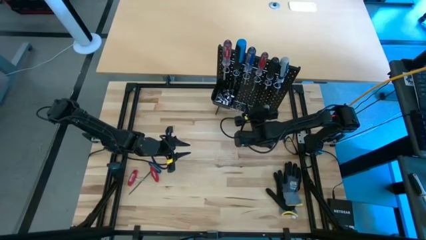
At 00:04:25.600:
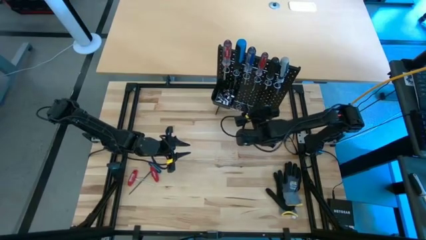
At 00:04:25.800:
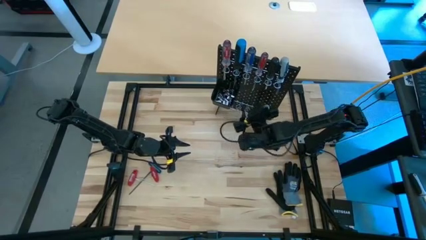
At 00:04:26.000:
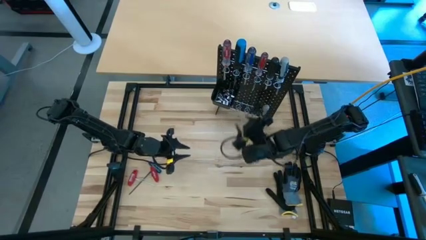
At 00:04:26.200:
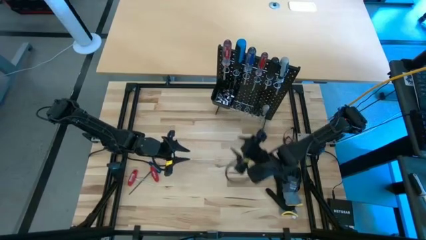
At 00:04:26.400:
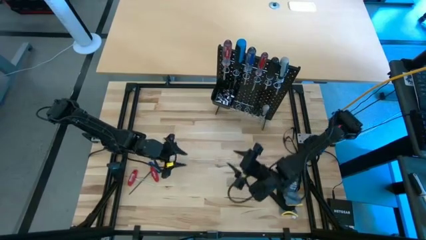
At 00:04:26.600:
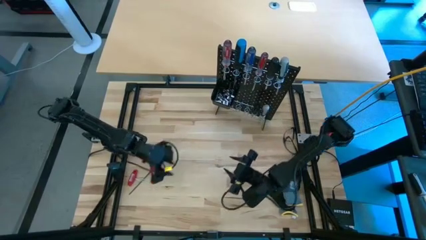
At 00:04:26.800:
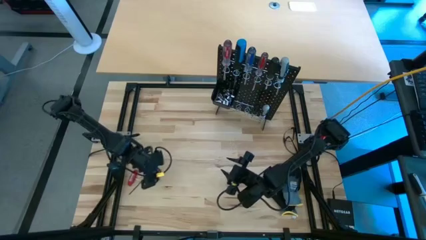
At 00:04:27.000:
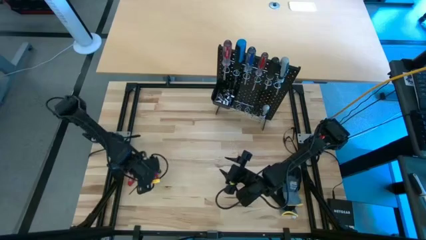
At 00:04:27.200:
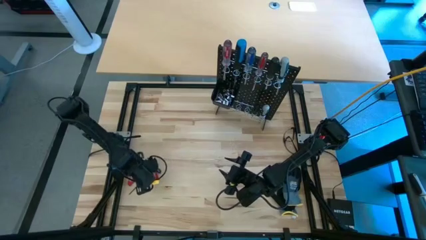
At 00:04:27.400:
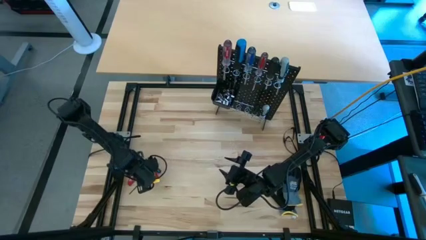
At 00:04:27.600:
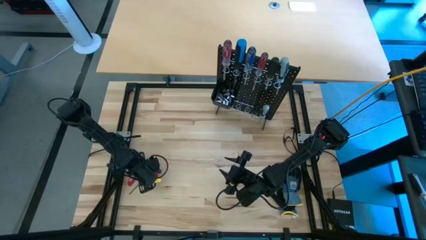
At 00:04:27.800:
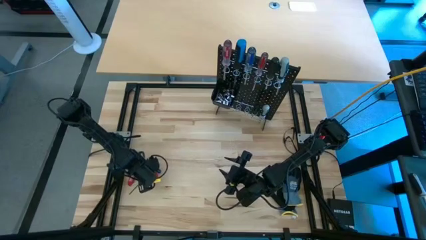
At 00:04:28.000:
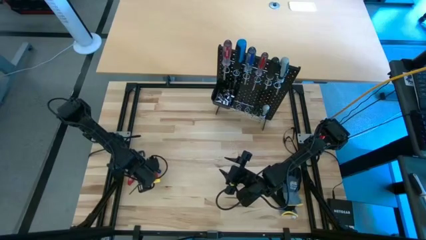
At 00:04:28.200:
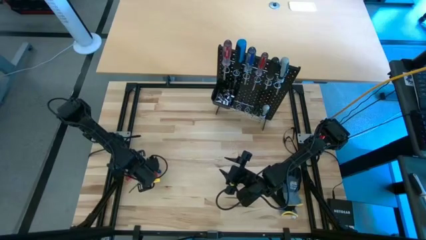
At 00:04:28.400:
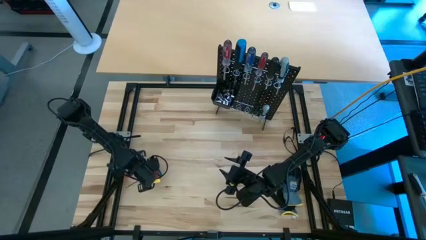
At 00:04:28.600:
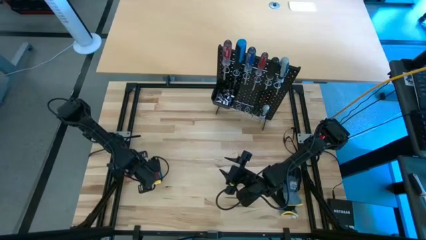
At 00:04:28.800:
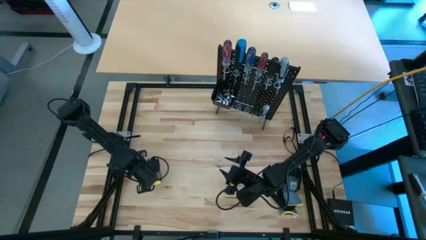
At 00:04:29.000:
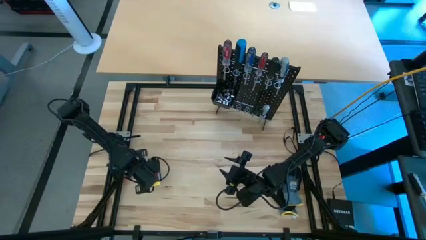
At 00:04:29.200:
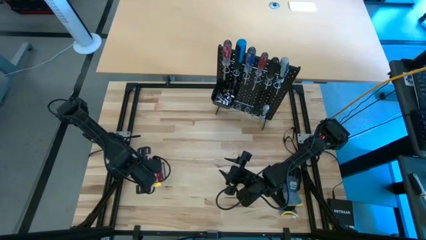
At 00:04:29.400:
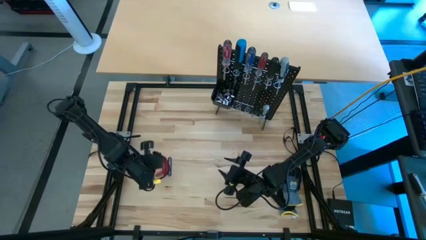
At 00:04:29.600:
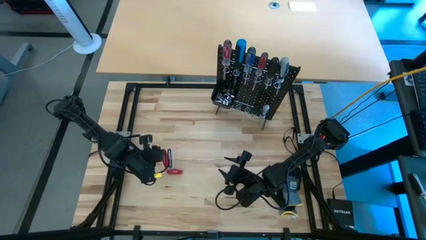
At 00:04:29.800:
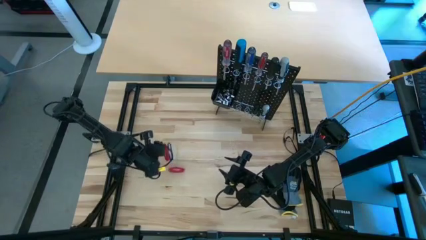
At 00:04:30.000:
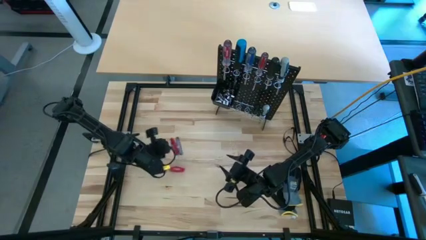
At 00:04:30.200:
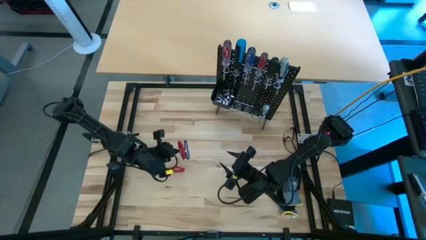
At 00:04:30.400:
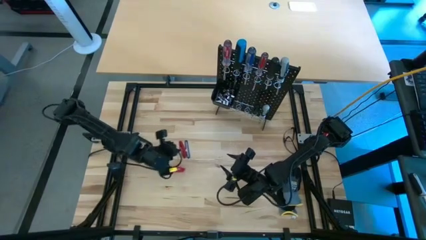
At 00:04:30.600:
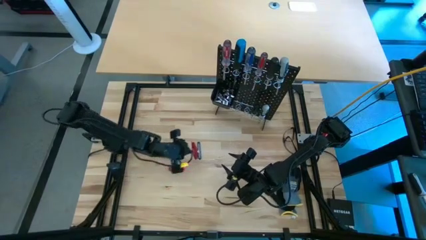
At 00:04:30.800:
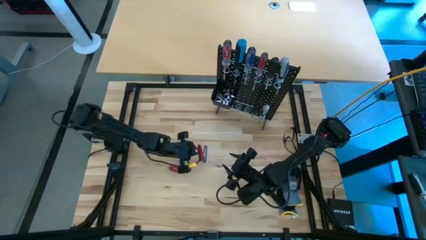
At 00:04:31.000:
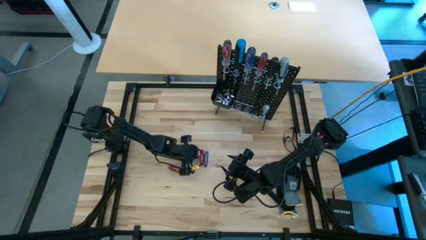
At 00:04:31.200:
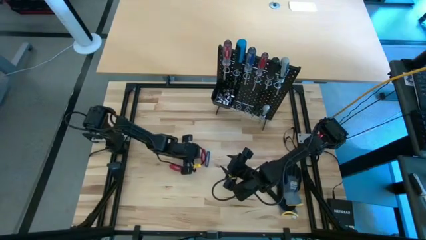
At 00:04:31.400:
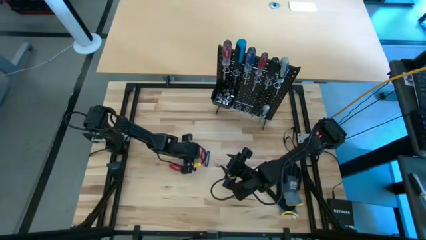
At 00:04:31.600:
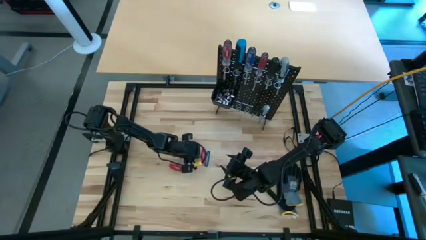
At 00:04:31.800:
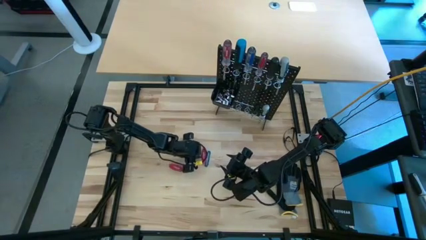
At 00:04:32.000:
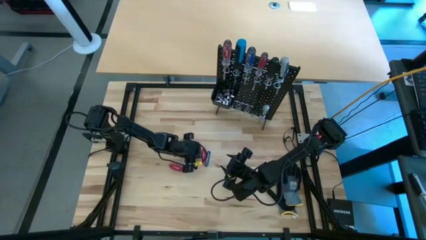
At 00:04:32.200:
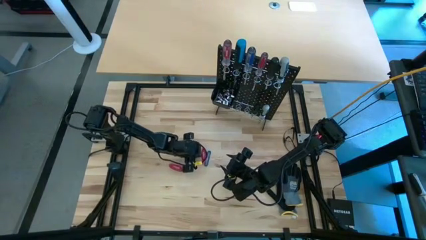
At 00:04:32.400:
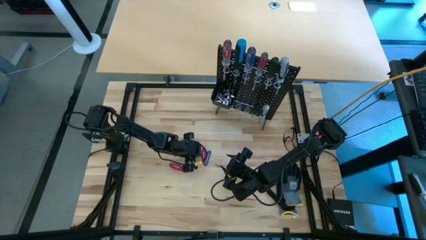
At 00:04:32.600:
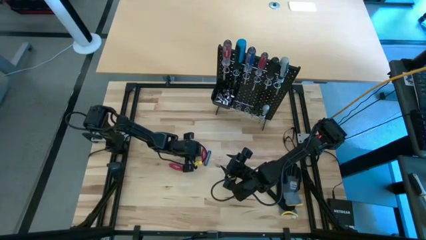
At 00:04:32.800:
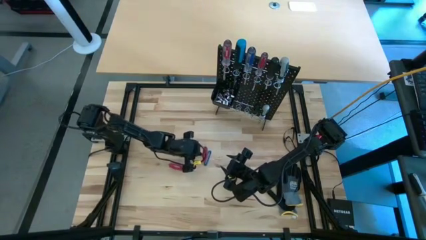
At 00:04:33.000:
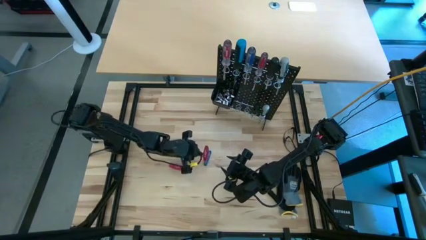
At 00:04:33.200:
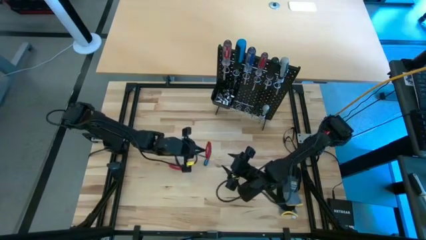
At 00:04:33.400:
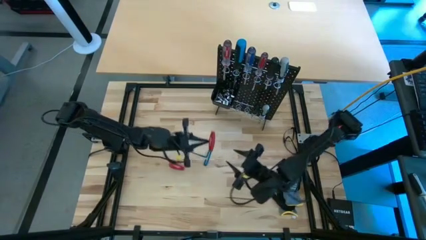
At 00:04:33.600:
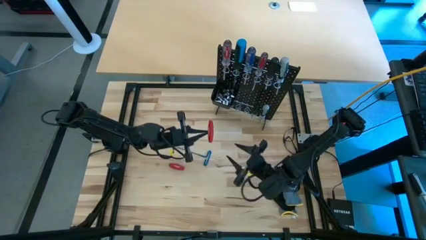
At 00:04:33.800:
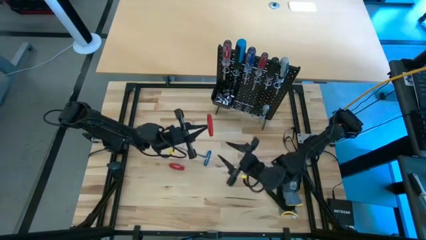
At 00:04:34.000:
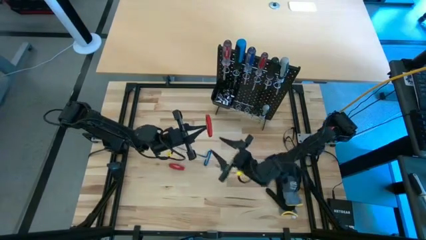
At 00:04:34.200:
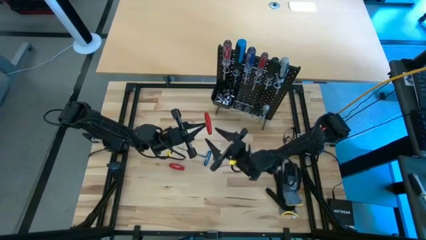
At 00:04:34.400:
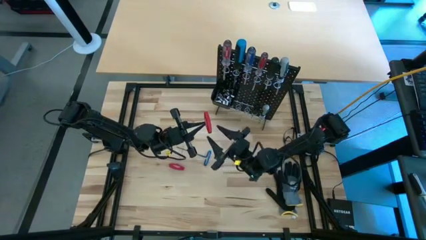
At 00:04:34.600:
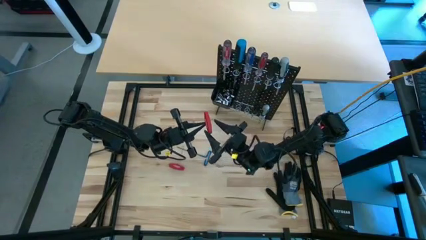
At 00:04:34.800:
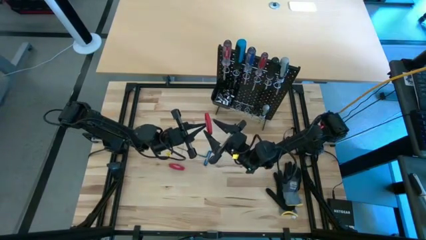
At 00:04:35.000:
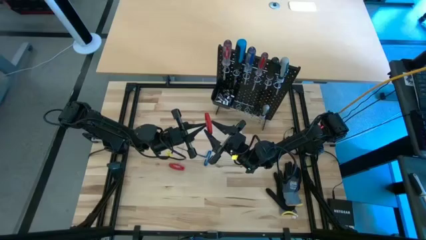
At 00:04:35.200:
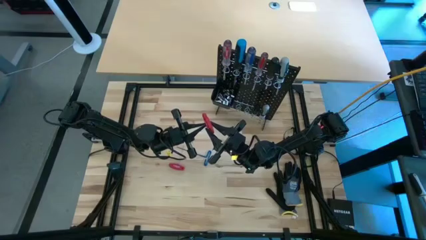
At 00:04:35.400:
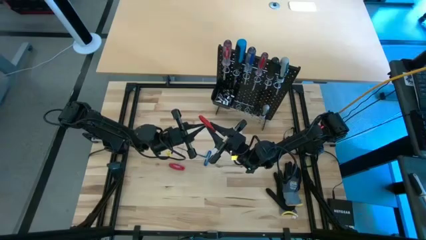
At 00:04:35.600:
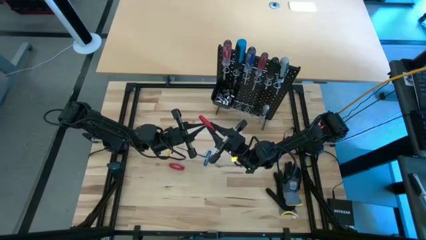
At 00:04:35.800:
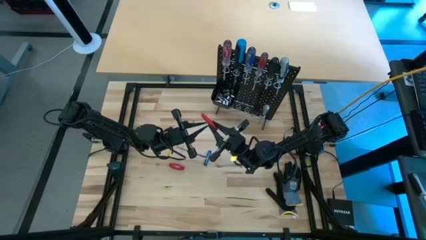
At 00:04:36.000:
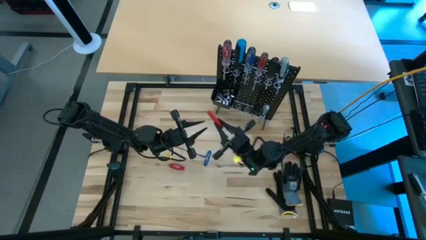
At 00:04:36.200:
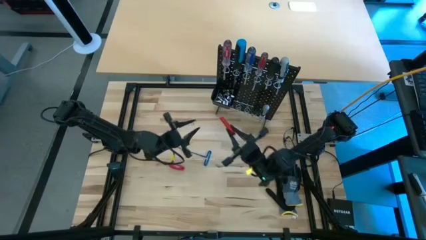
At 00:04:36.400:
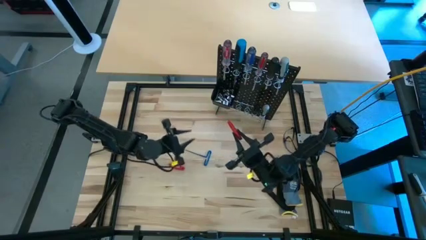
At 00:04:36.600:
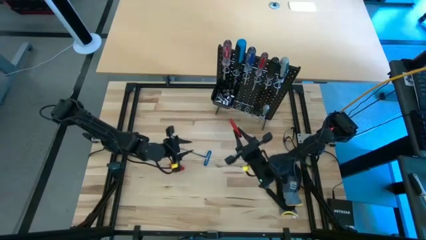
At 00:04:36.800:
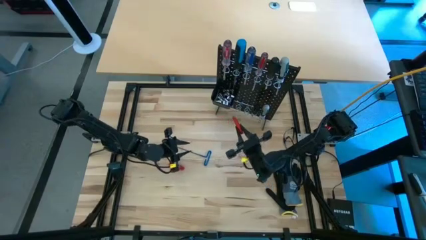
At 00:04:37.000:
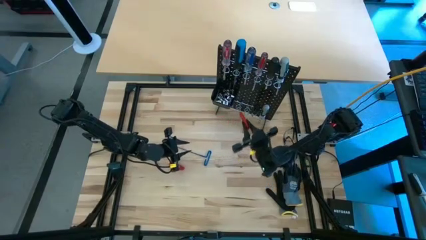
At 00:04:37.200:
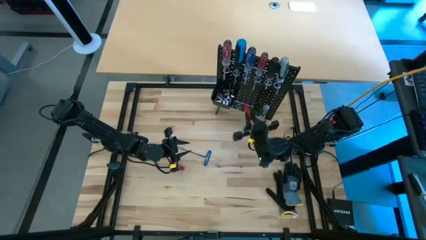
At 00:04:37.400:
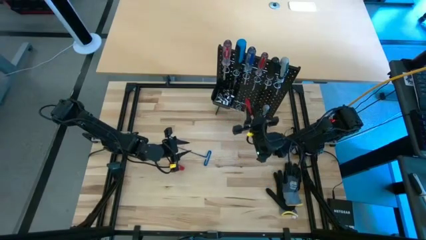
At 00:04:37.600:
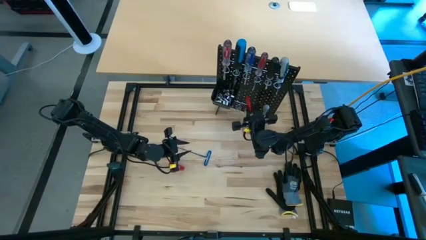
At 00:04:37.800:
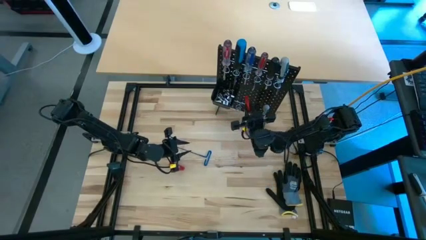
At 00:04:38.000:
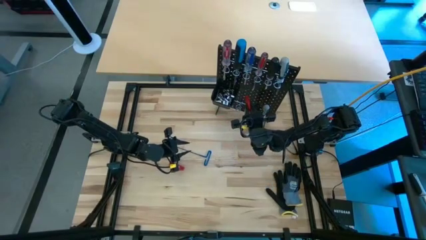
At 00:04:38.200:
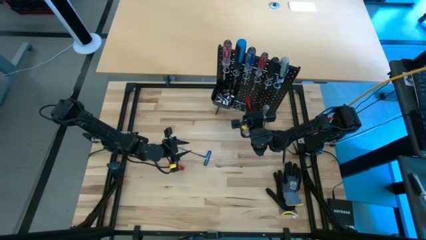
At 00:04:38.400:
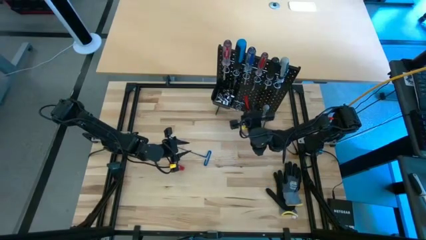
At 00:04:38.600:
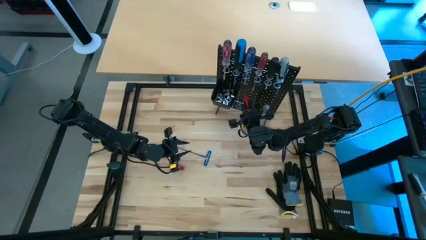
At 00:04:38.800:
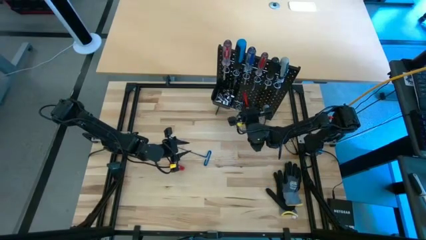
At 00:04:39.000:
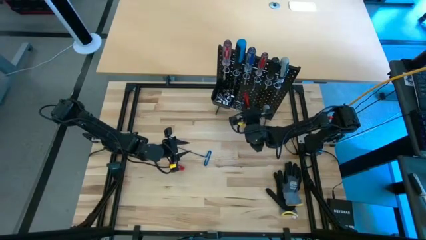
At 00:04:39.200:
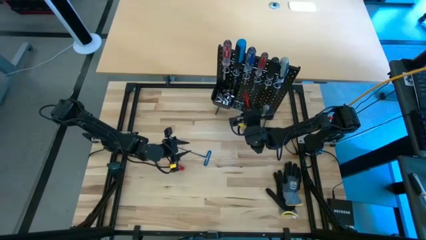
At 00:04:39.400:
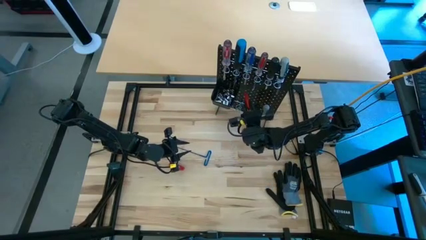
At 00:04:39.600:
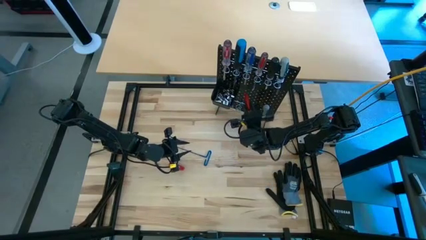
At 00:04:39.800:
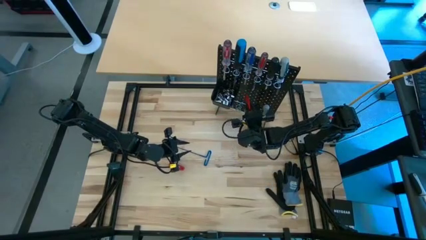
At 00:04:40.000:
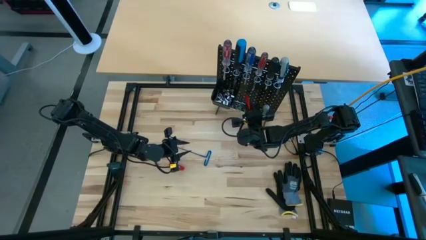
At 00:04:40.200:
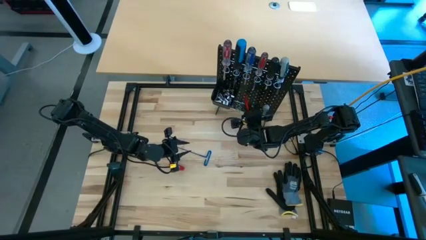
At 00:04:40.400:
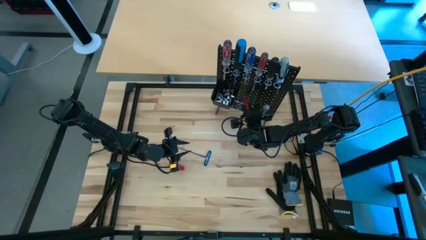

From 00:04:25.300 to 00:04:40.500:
Task: Hang tools onto peg board
Hang the right red allen wrench on the black pegboard
